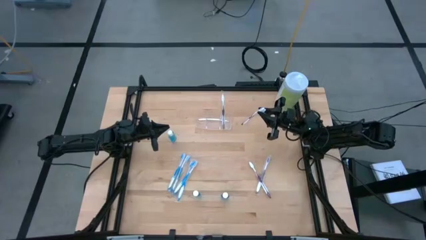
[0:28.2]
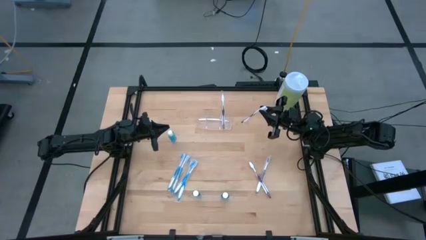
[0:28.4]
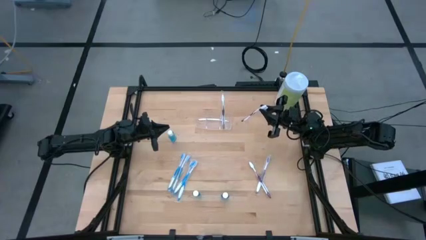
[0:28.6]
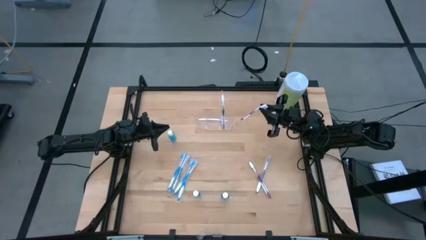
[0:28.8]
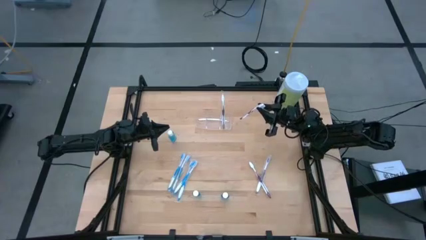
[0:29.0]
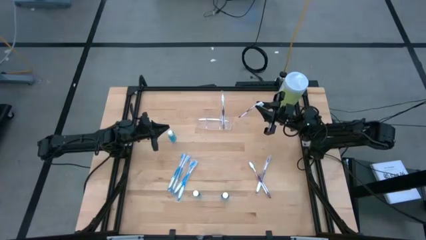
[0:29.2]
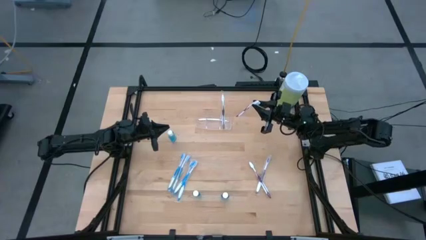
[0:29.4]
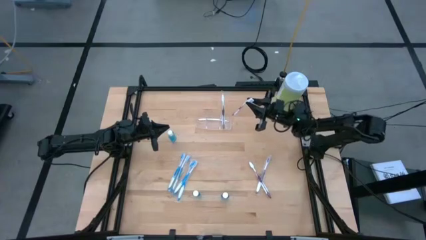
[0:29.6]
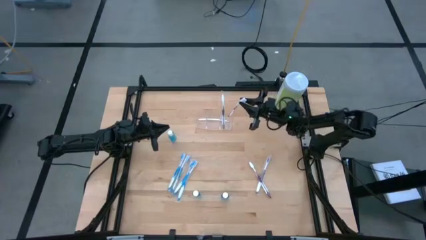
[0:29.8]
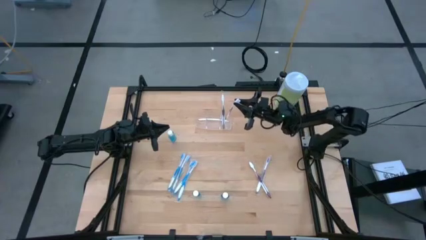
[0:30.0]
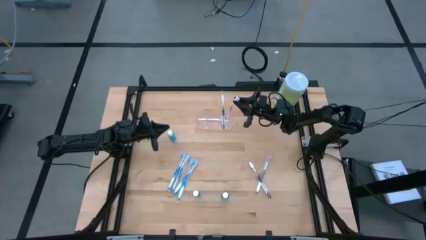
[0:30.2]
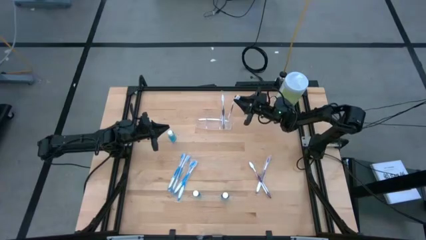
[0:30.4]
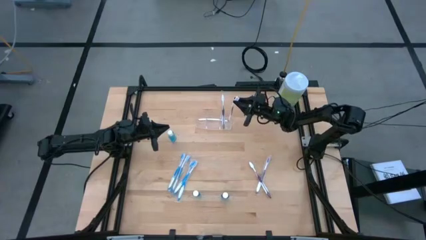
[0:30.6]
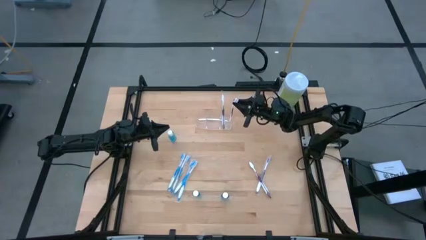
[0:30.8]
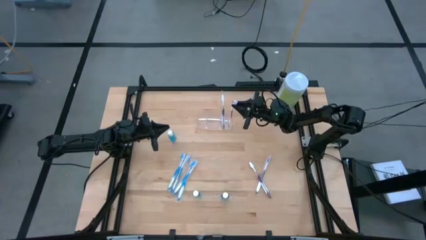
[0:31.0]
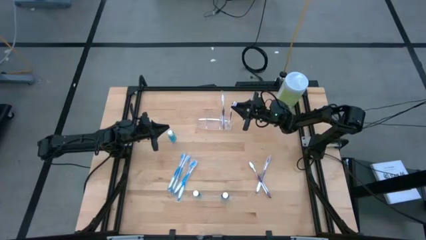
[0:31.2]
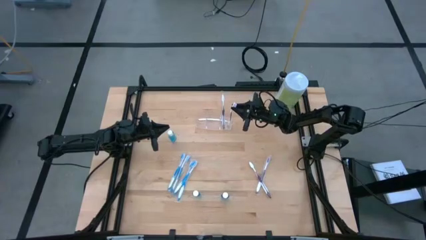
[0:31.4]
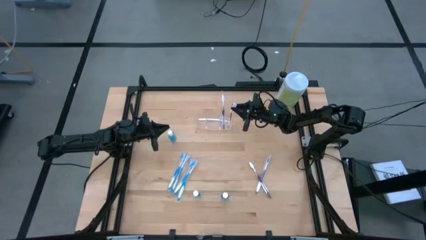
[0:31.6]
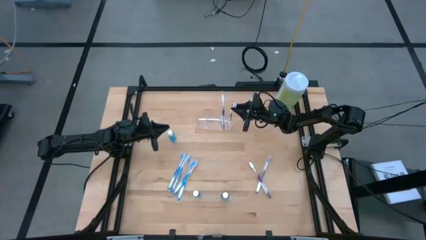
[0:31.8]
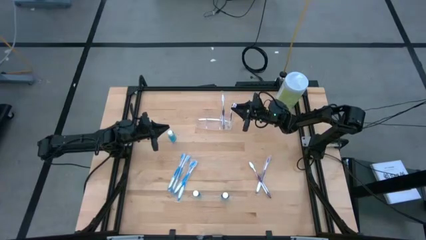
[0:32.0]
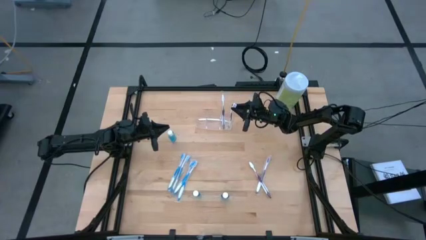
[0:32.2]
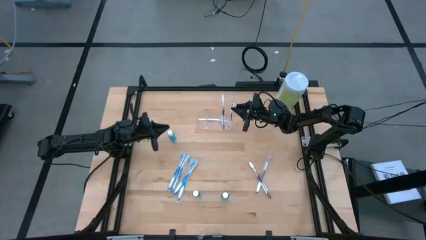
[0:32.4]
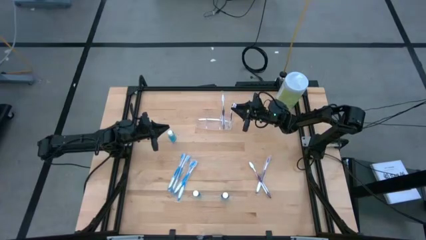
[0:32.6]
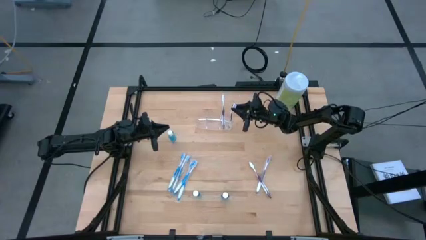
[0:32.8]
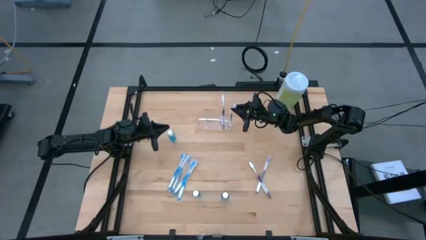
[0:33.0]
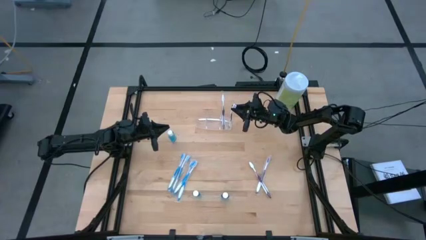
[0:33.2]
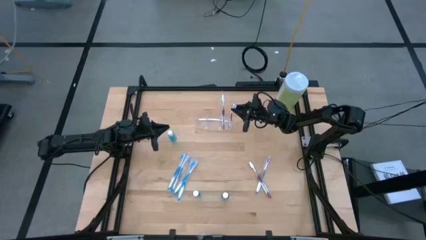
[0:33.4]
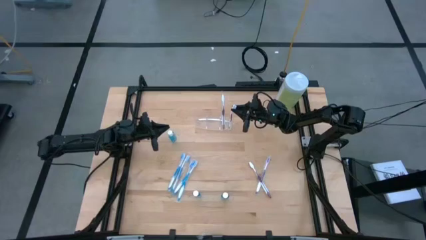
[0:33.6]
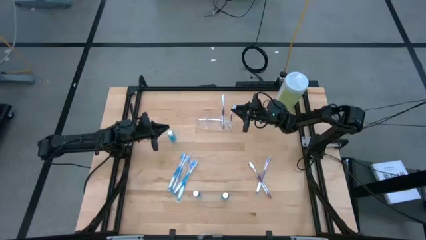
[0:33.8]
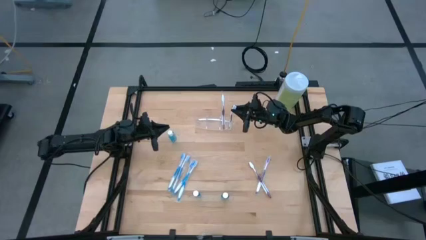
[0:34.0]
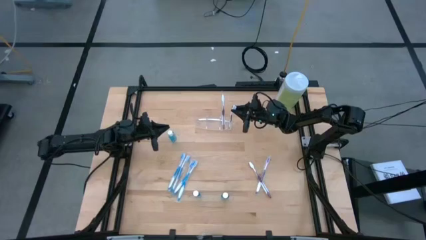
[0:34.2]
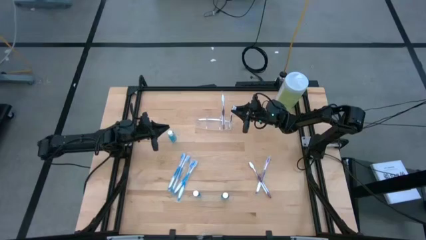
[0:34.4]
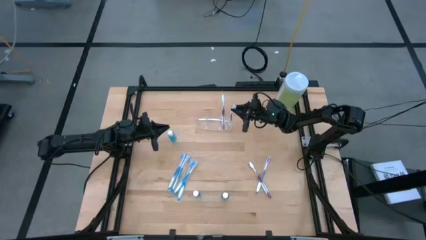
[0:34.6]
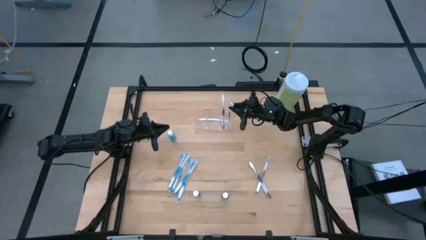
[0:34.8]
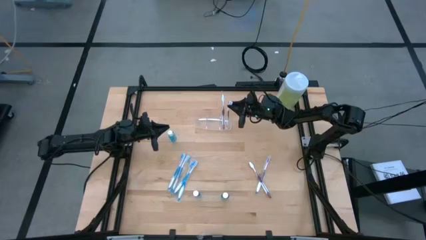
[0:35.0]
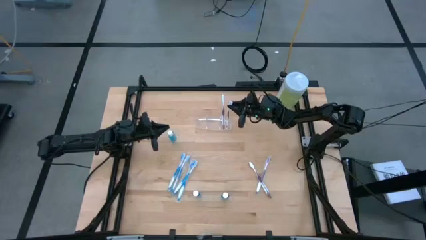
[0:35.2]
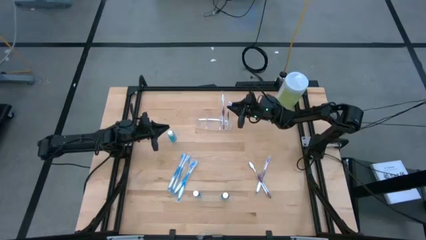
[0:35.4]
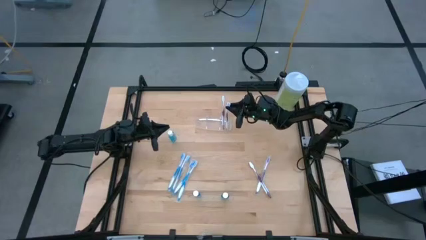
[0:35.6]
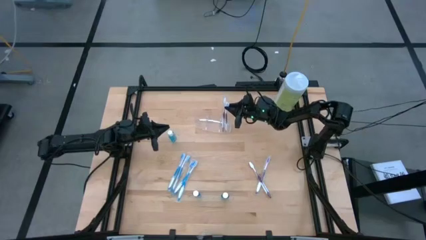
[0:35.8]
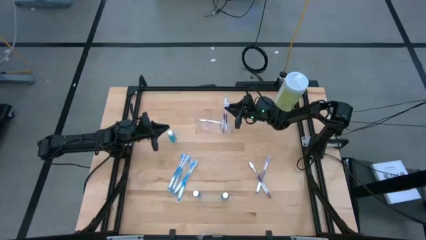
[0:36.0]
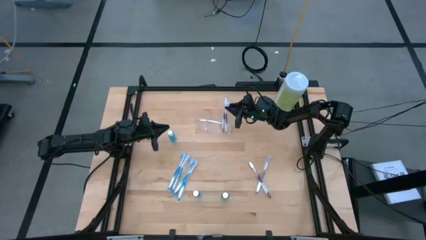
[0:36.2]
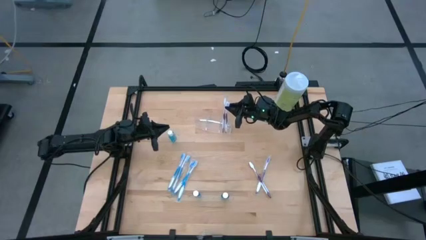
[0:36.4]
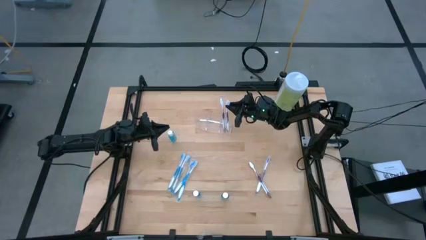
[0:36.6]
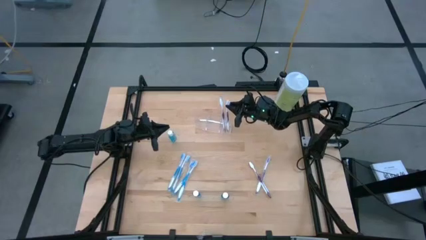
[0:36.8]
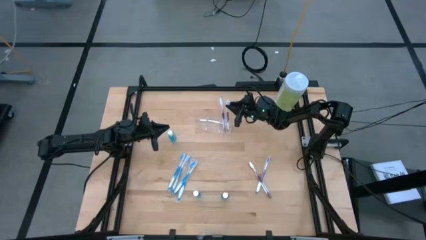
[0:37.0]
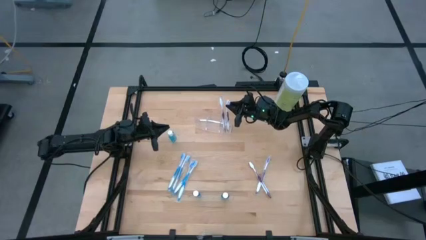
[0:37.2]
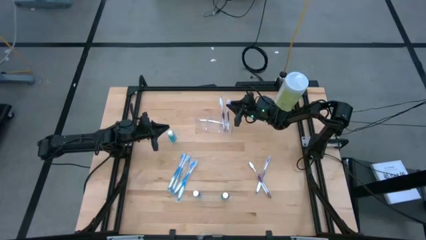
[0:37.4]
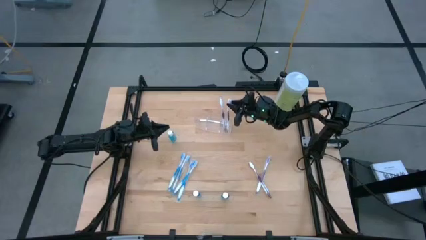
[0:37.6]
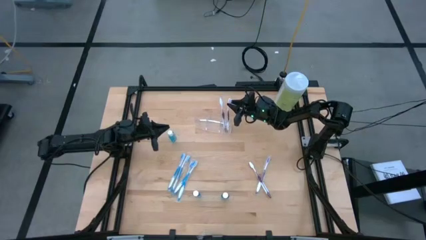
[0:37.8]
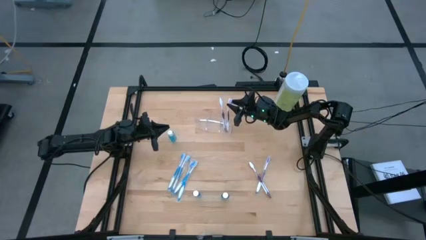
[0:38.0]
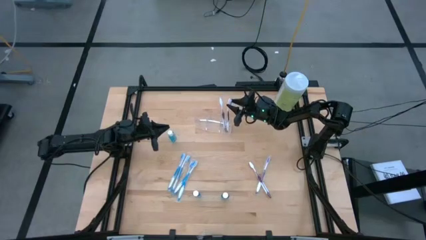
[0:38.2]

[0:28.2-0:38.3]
Task: Pick & Place toothbrushing station
Put the violet toothbrush into the transparent organizer

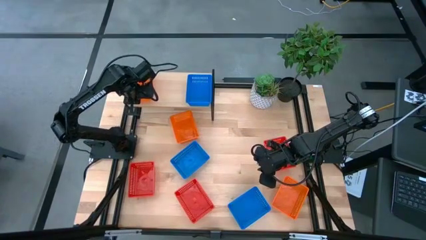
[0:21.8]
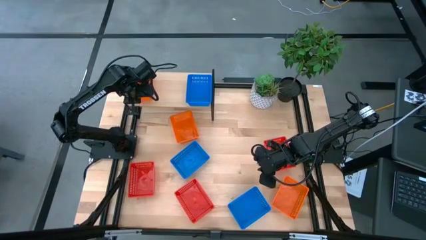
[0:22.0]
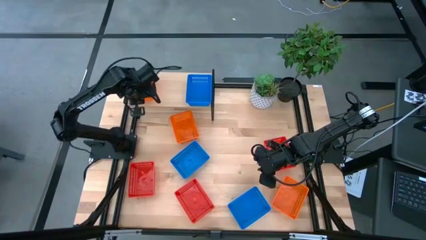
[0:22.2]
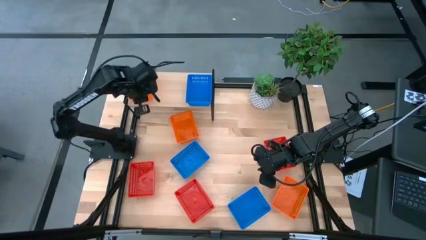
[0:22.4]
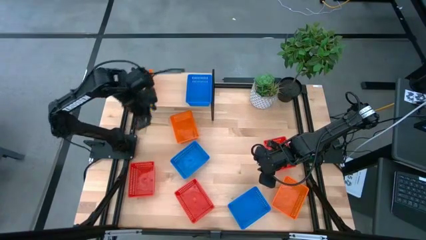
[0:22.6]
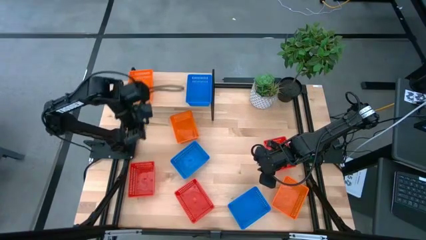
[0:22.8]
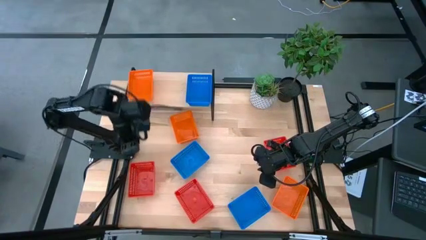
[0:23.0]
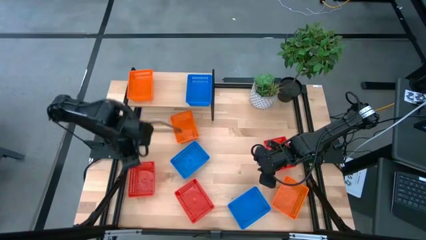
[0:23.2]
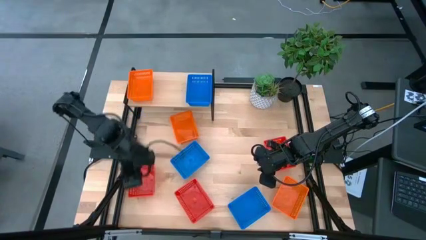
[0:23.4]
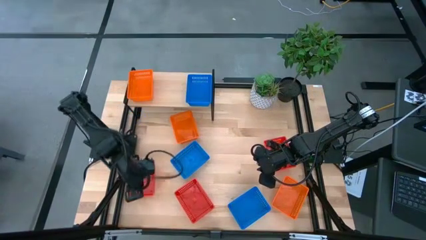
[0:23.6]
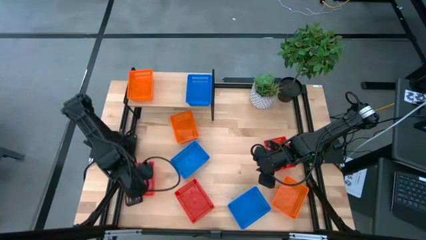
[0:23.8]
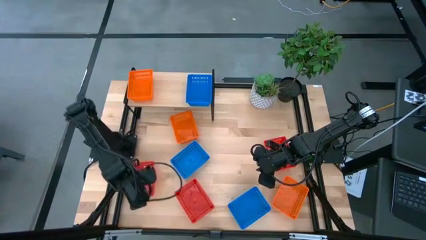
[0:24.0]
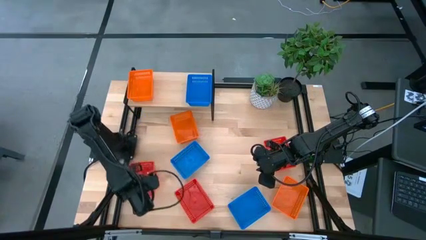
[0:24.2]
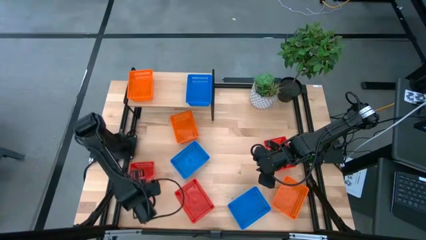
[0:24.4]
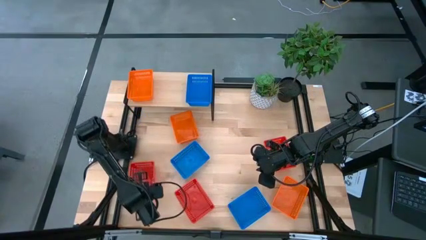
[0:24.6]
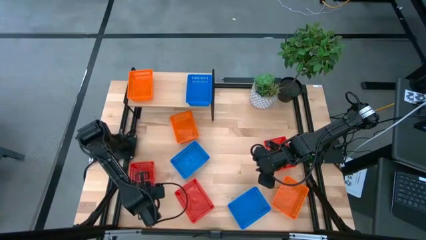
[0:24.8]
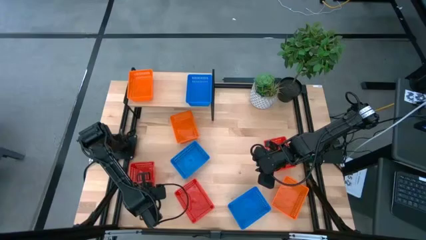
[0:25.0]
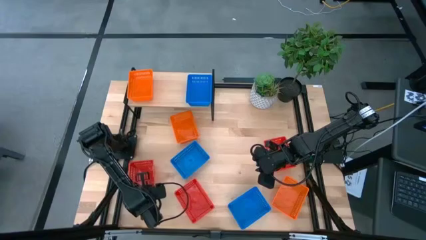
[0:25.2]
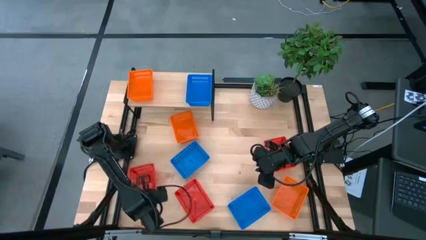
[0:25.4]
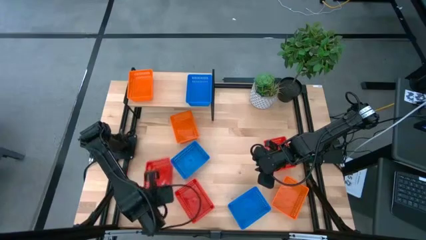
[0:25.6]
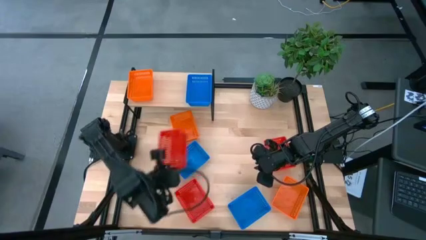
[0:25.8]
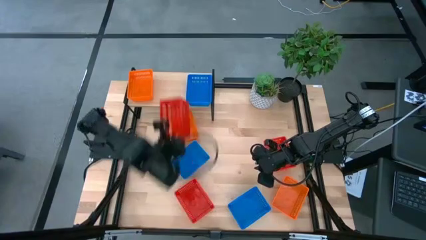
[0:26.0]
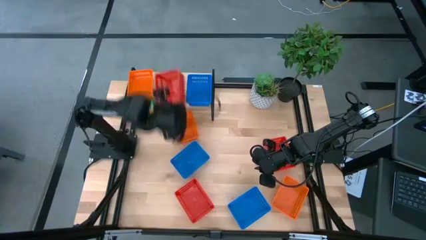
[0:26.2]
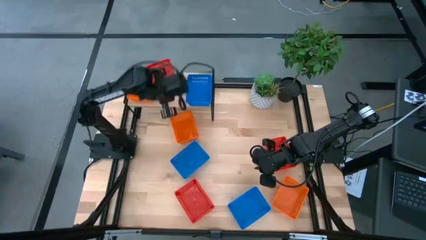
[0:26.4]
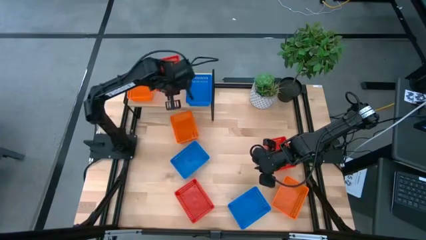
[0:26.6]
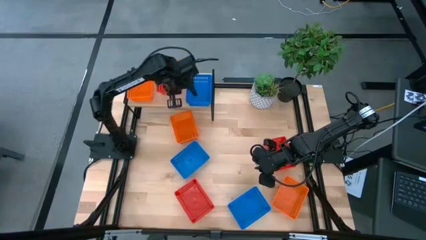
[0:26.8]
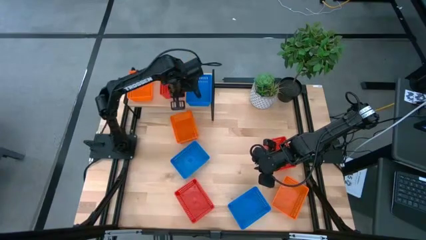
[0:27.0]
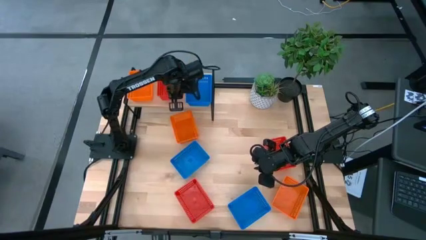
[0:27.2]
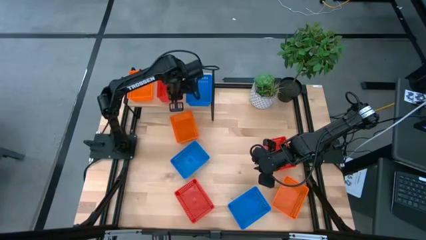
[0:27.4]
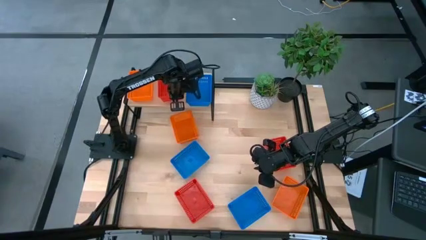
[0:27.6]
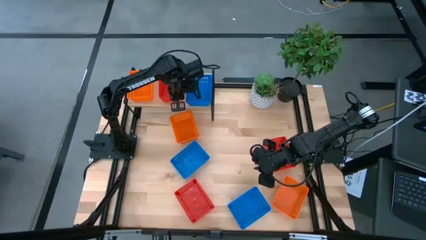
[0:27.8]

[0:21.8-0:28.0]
Task: Stack baskets on shelf by color
Put the left red bin on the shelf
